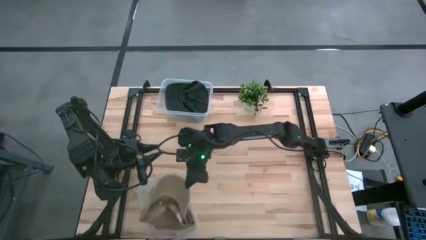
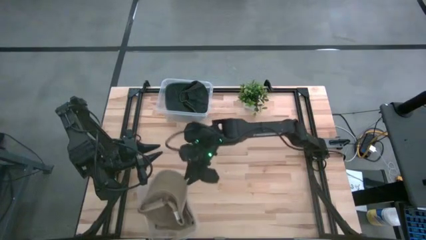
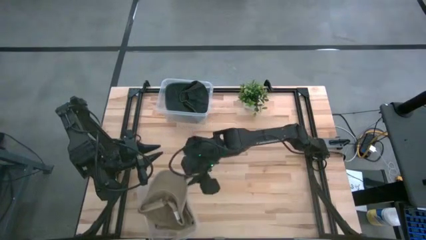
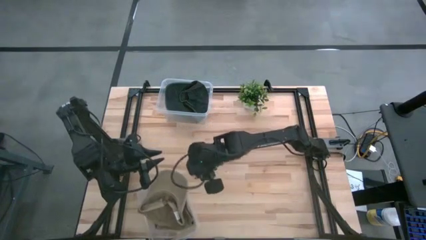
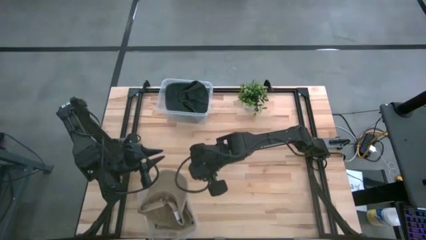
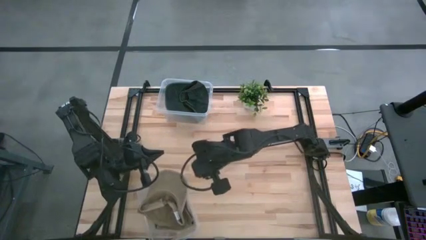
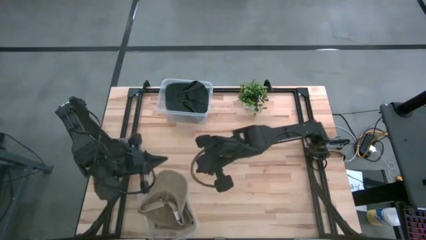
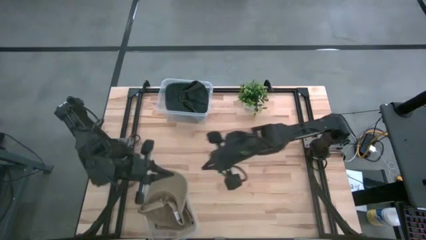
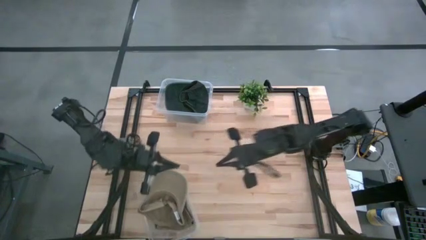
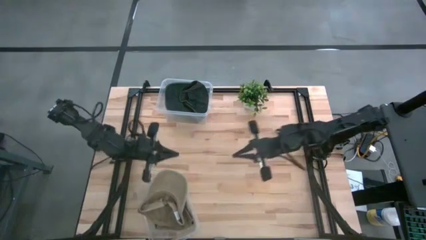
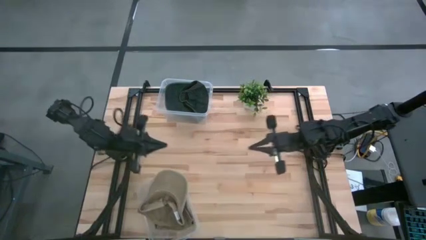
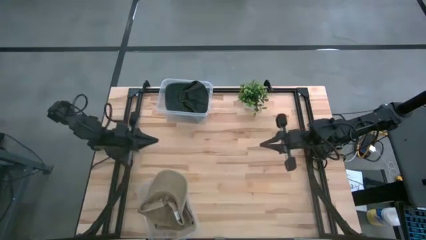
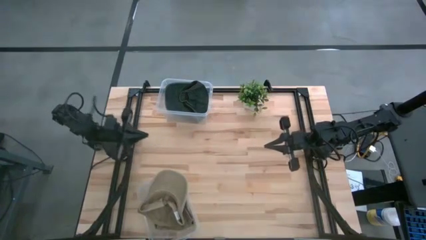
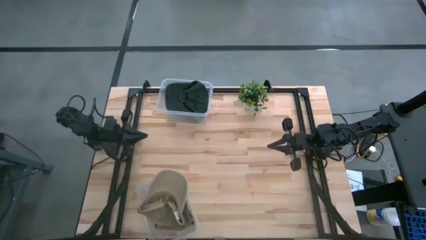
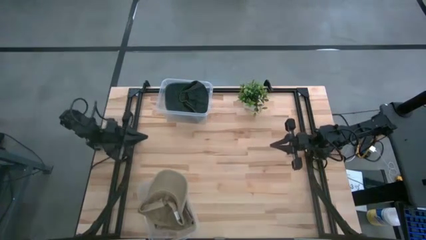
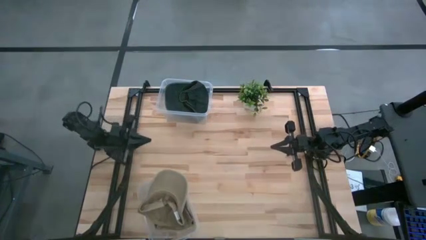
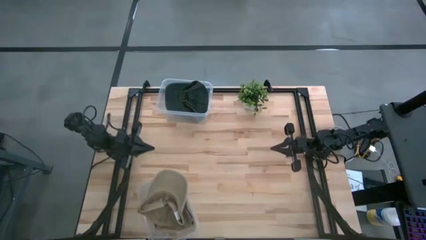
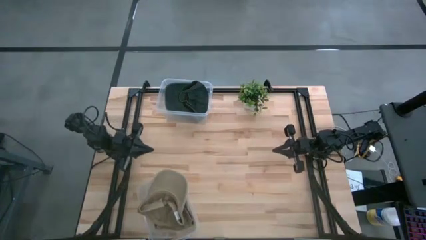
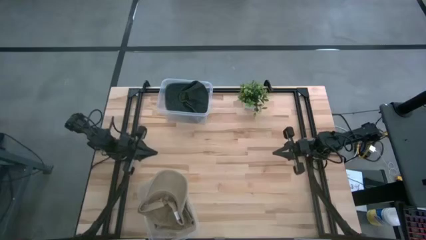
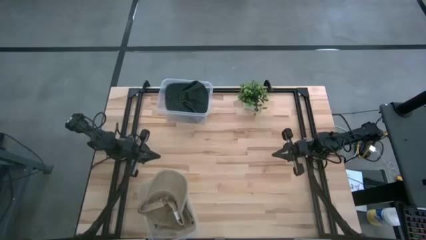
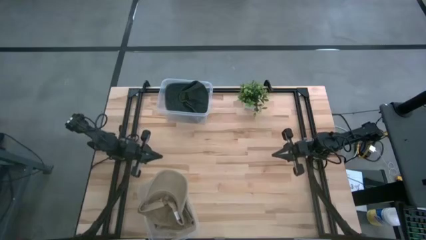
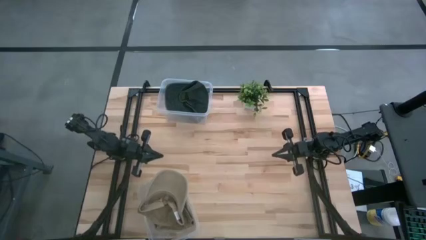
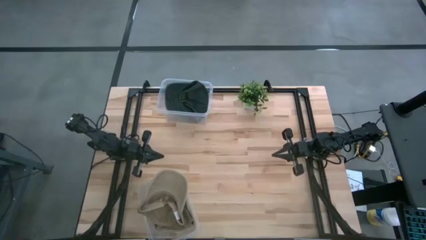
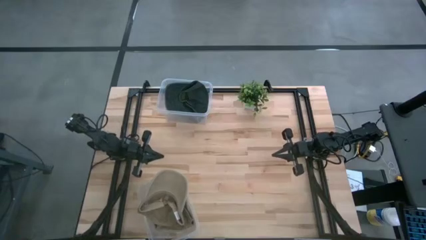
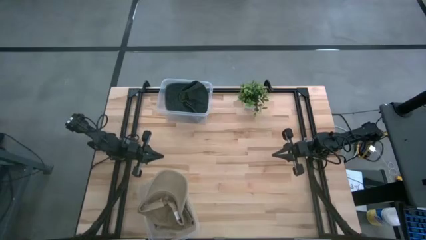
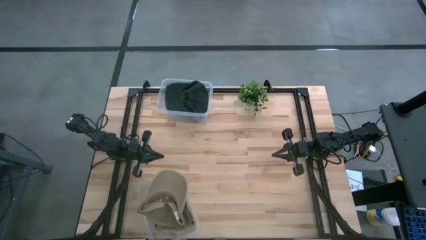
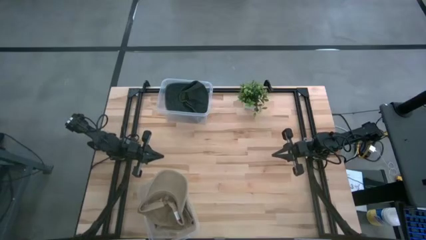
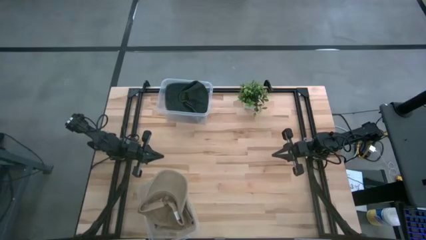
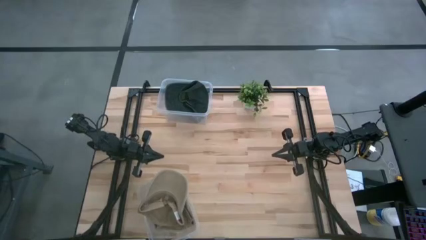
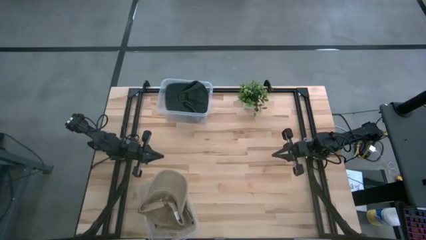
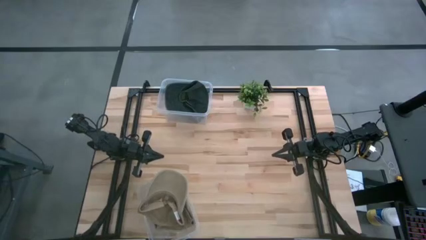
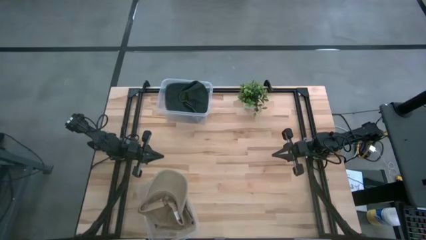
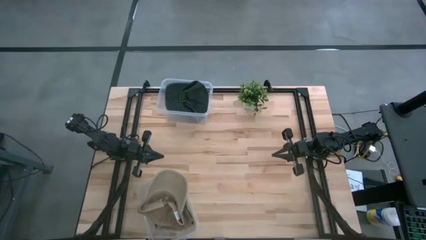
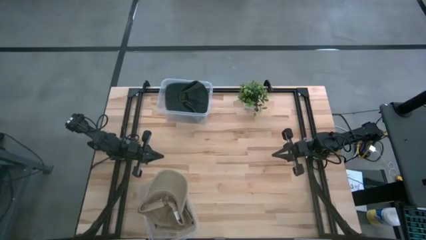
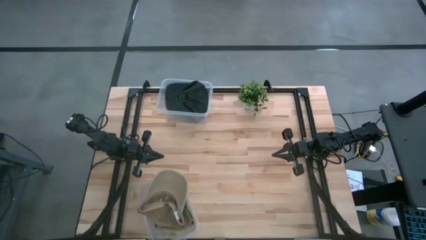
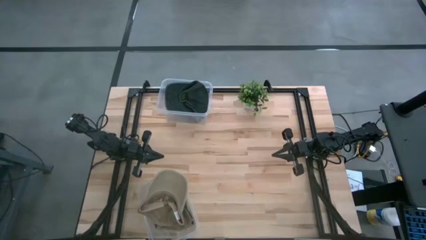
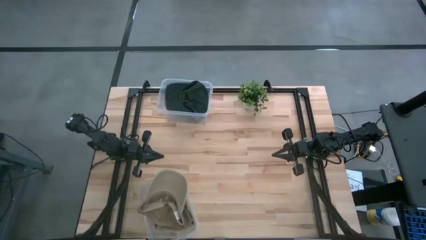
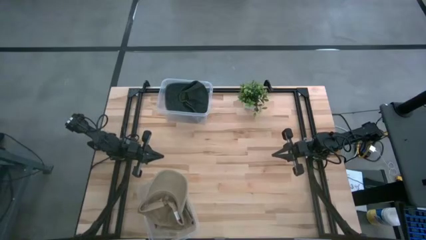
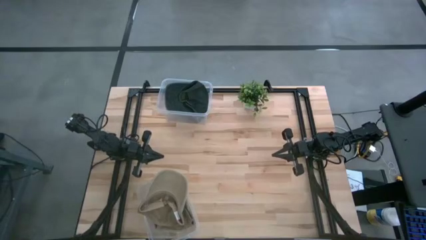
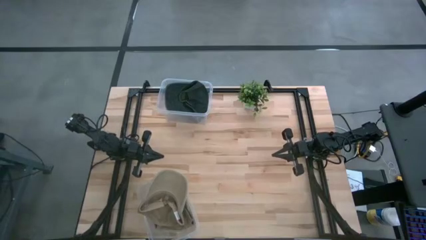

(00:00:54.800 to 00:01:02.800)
Task: Pick & Place hat
Return to Home Position

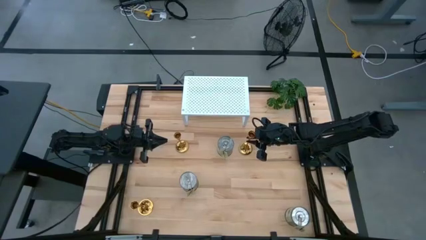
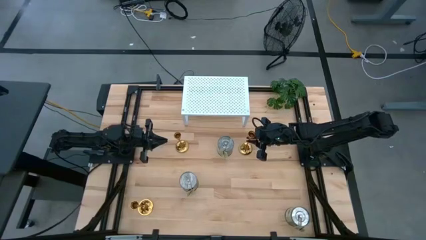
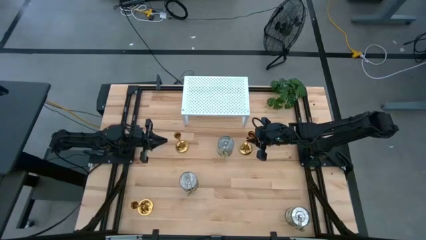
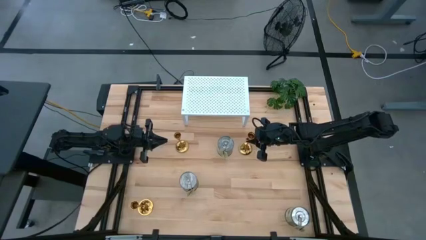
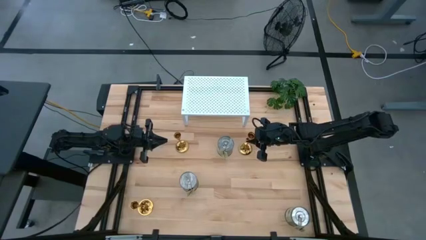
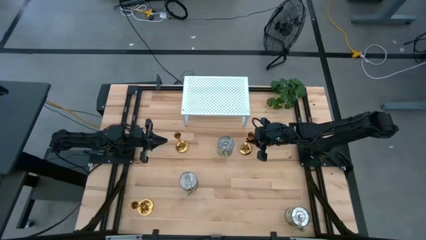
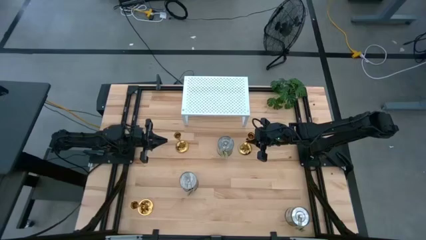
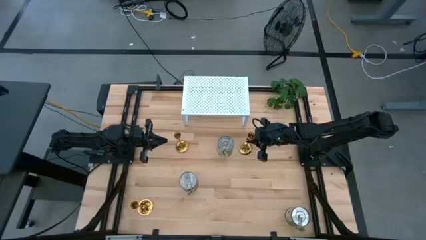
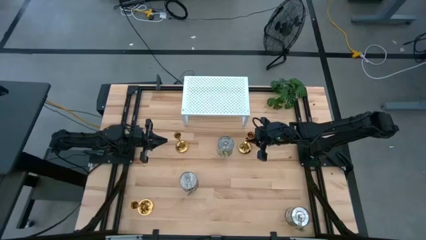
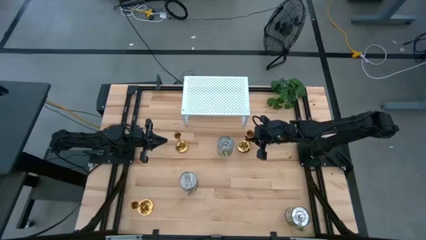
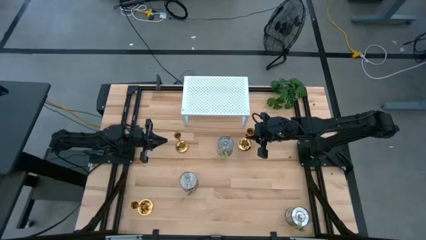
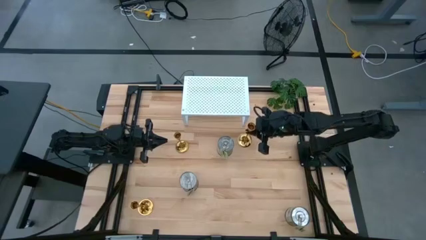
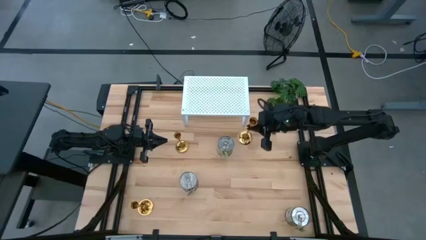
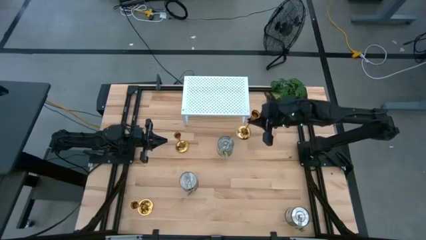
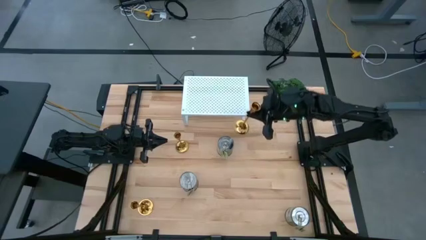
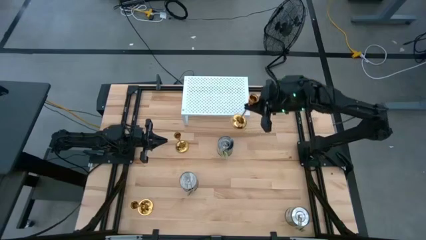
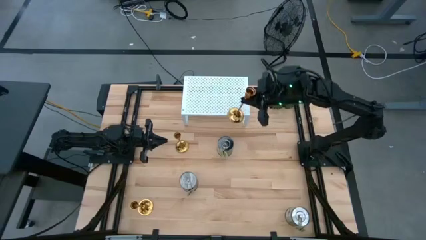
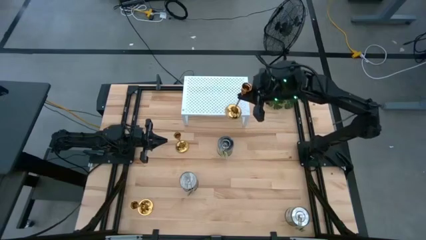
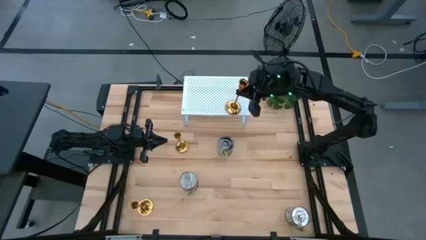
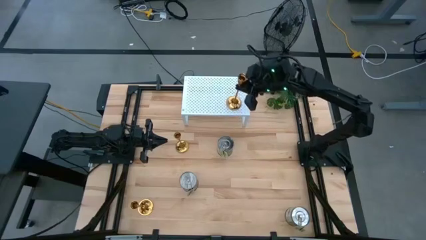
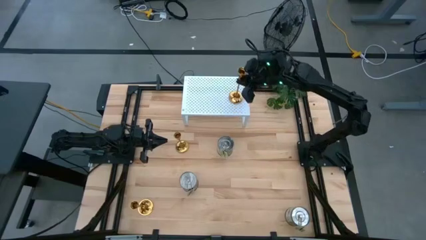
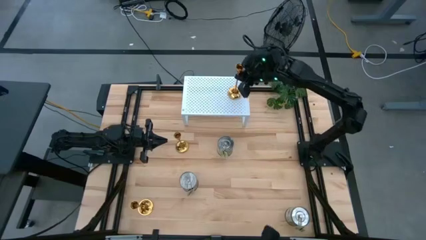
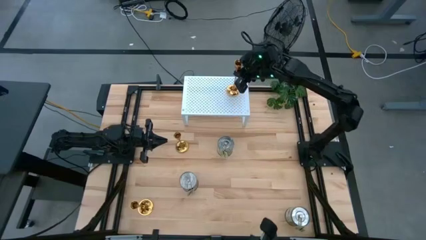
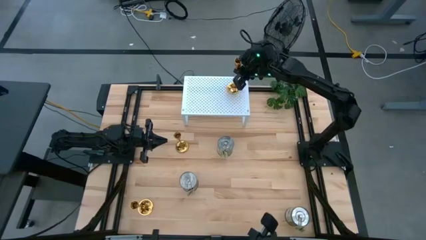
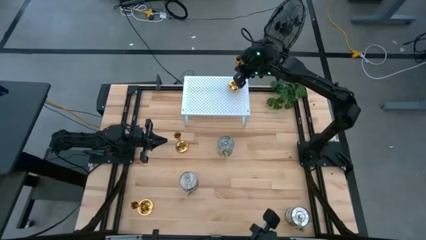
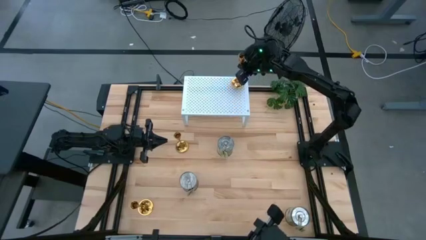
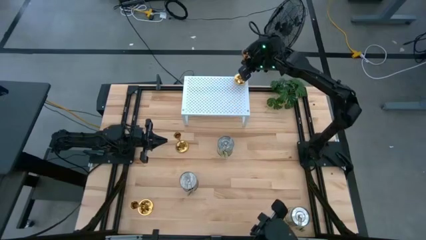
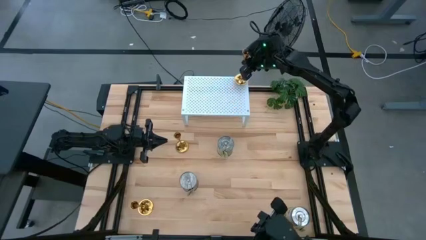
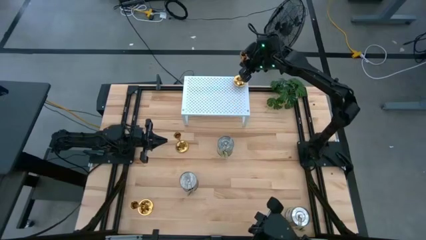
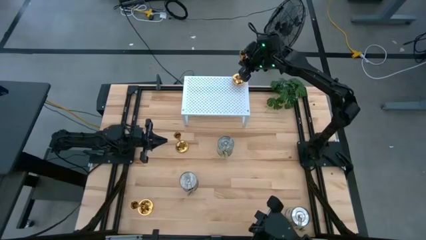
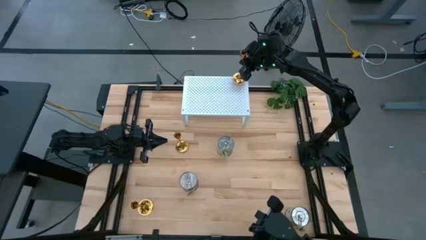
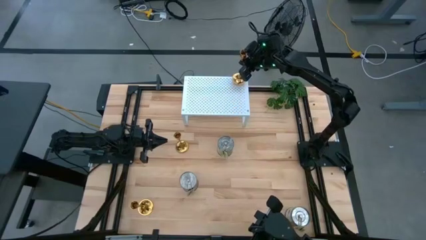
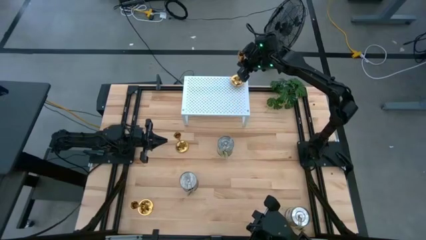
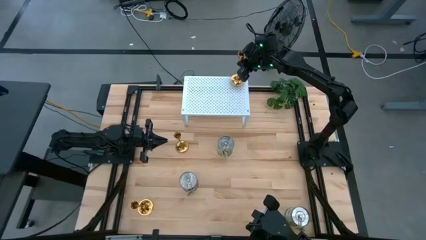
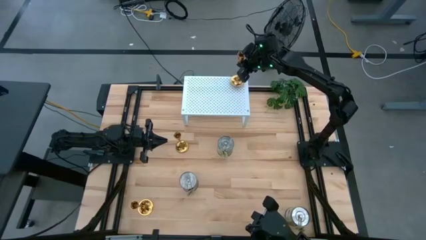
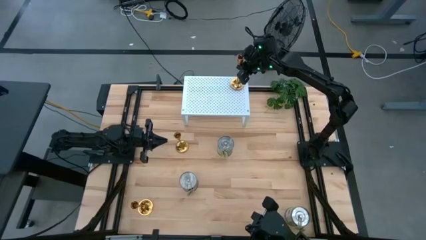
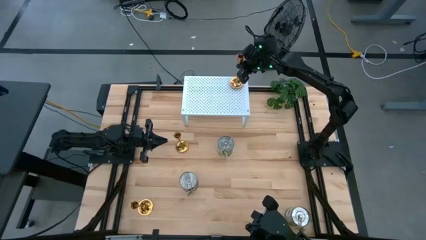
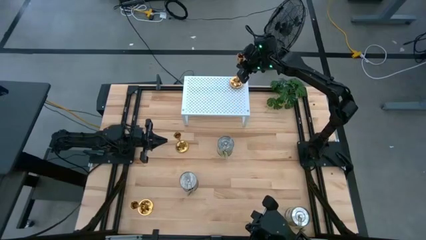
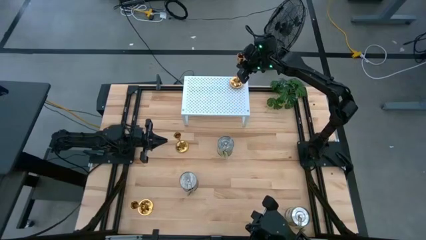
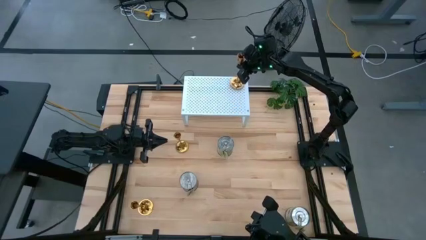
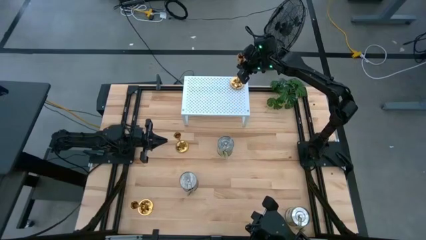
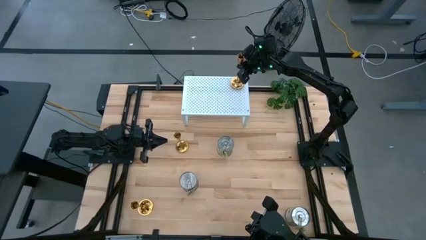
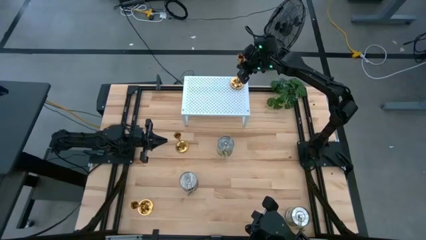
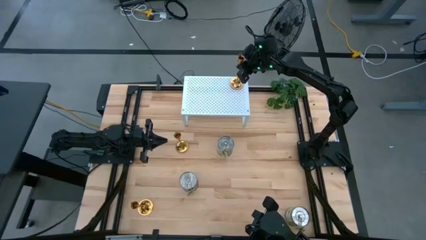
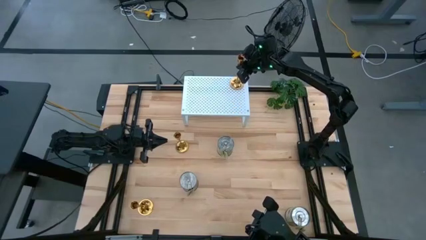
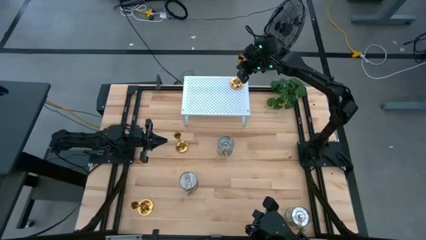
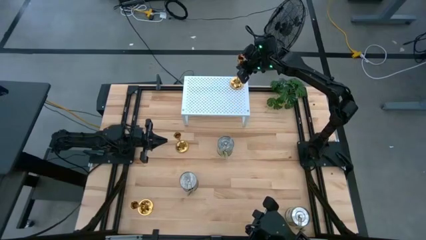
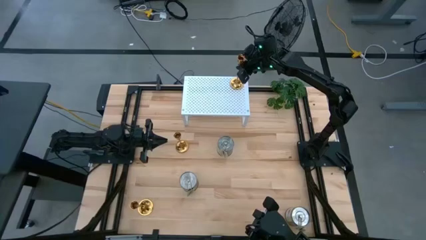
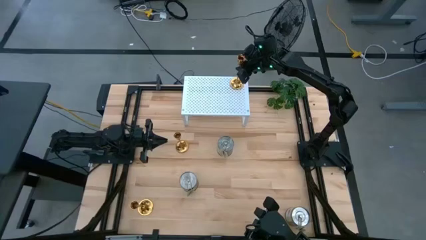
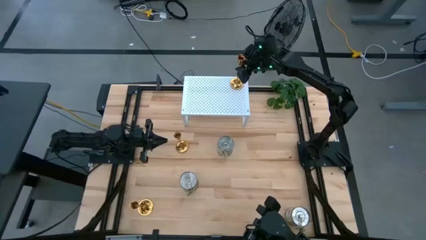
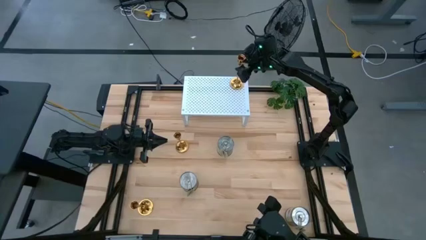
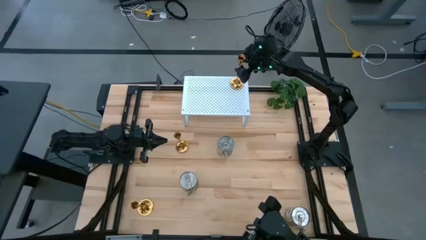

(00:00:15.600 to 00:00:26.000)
Task: Pick & Place candle stick holders
Put the right candle holder on the shelf
